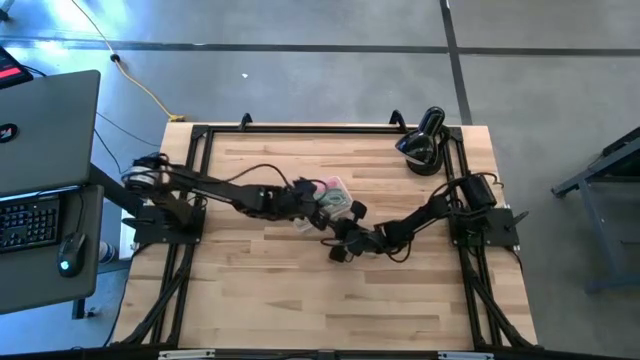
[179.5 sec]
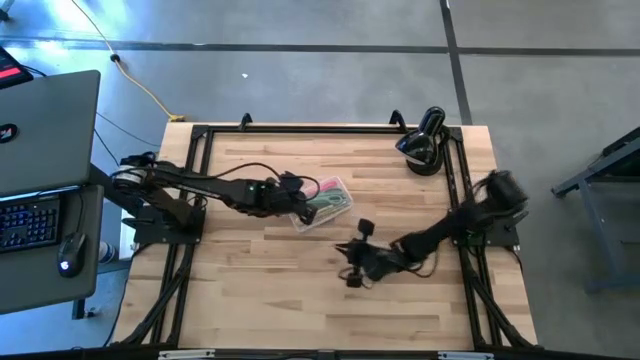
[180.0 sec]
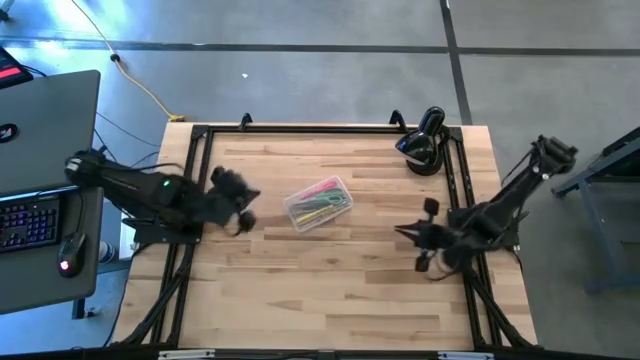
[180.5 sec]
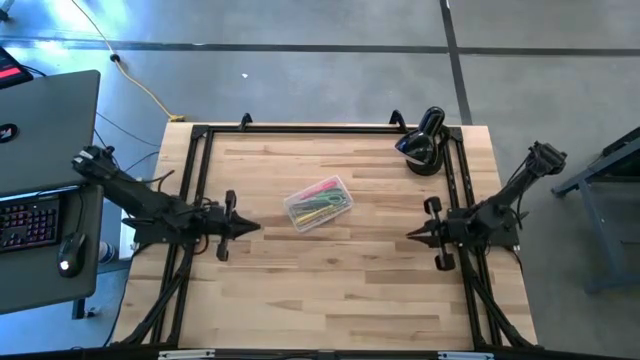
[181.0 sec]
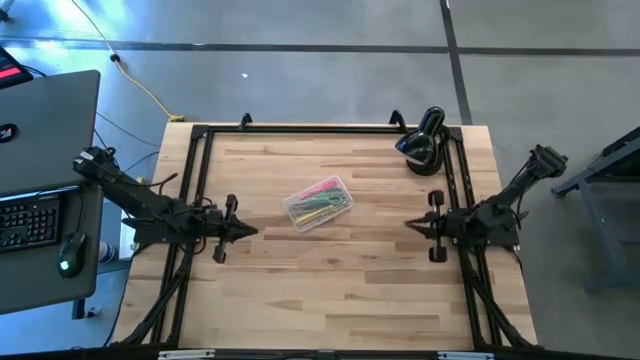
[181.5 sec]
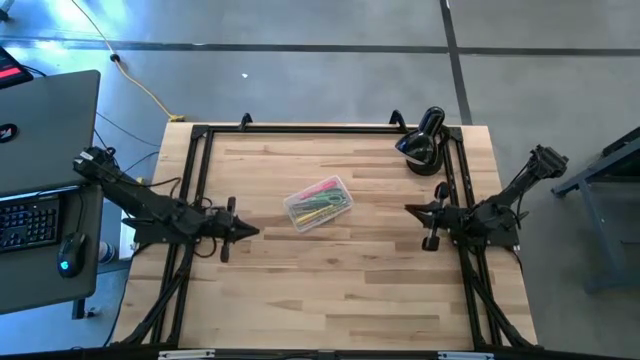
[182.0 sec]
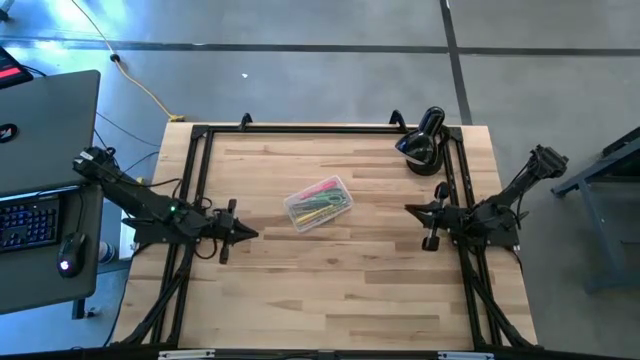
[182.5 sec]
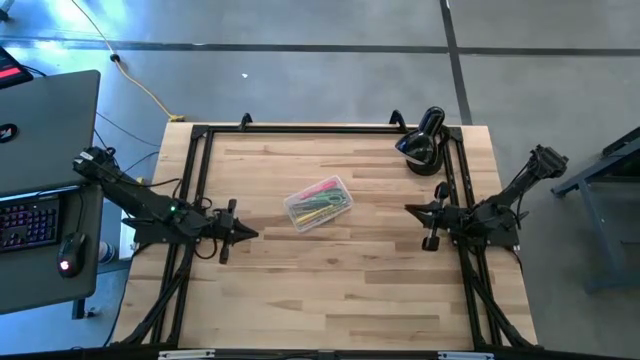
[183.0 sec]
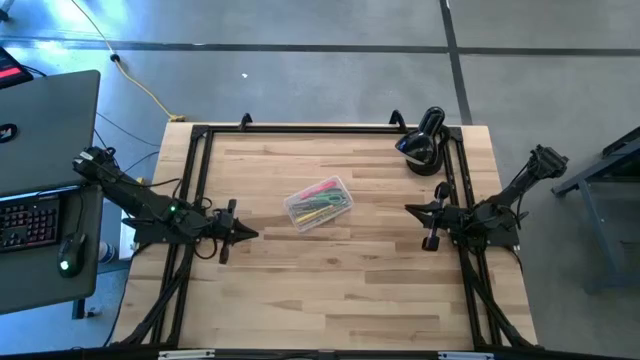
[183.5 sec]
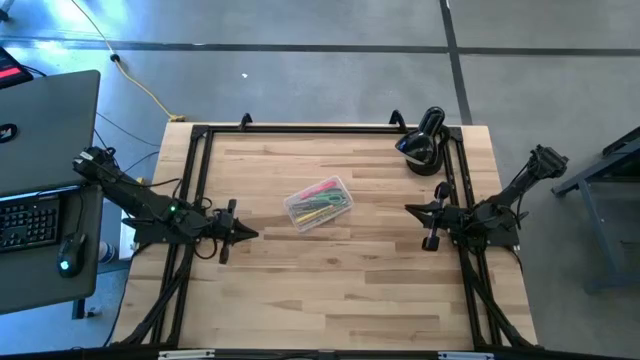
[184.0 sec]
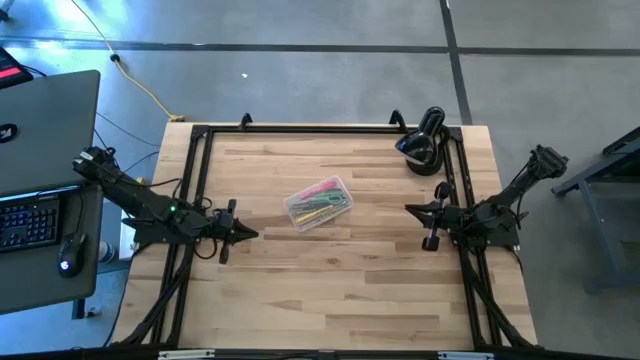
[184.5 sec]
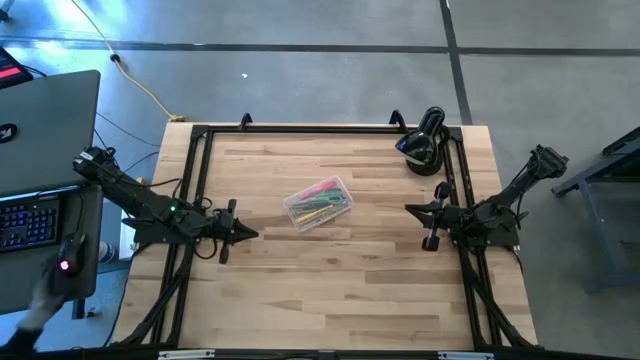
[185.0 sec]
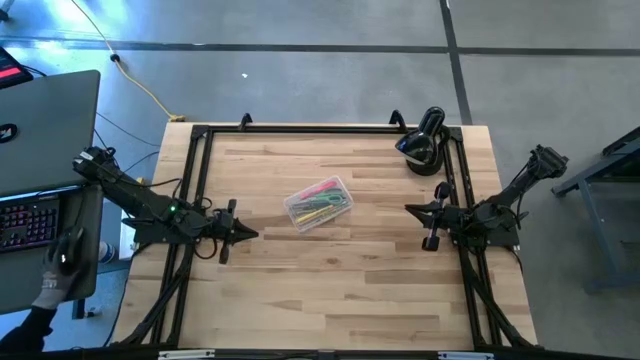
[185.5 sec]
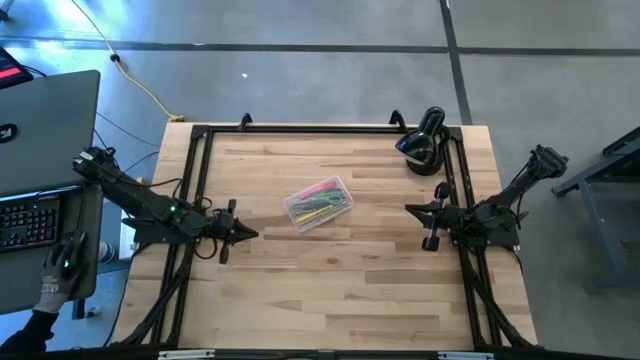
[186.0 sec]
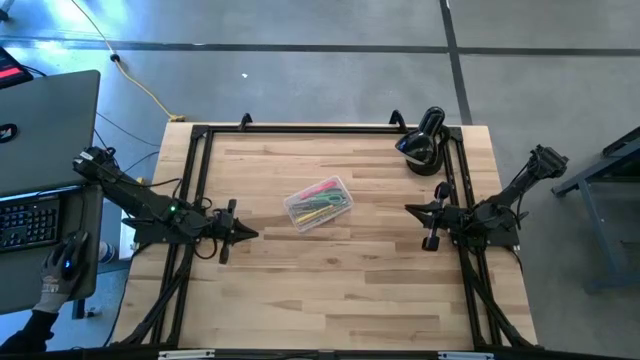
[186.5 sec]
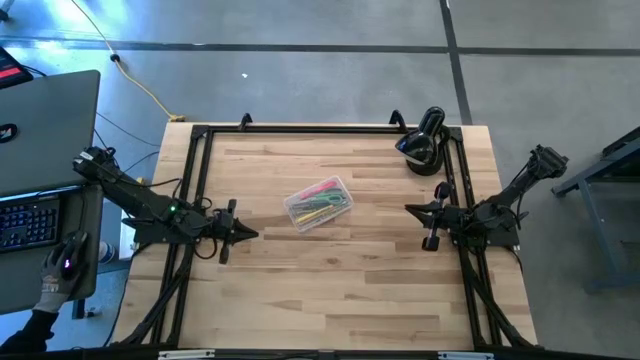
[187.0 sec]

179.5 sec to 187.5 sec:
Task: Pick & place school supplies into a supply box
Return to home position

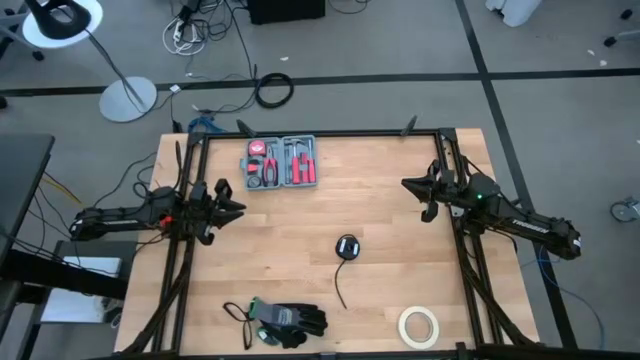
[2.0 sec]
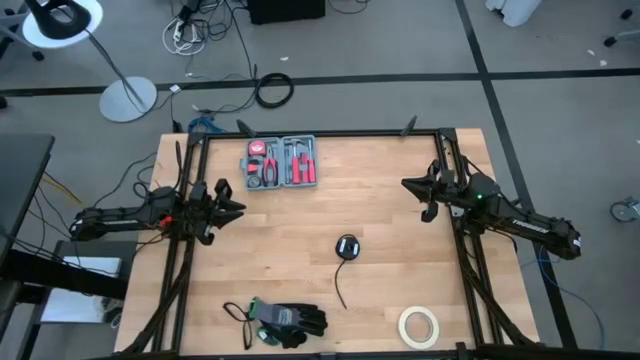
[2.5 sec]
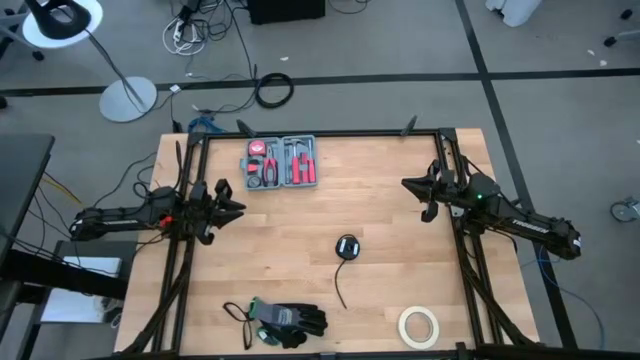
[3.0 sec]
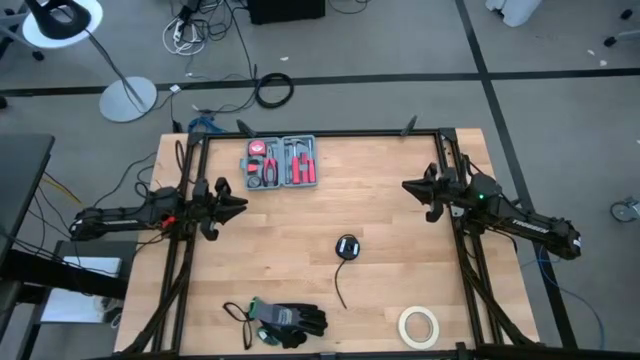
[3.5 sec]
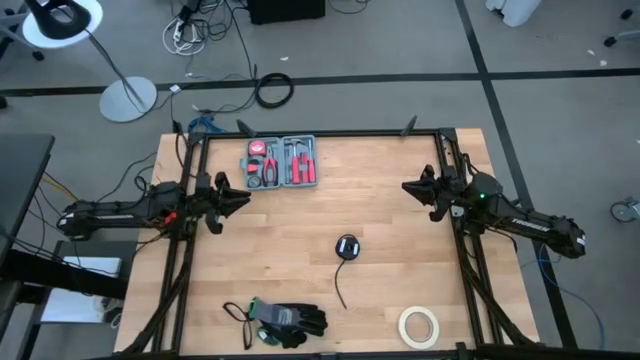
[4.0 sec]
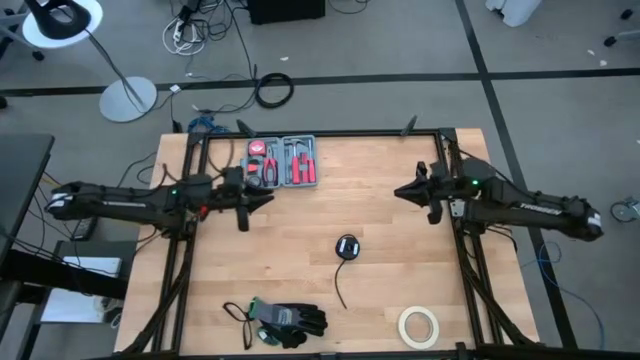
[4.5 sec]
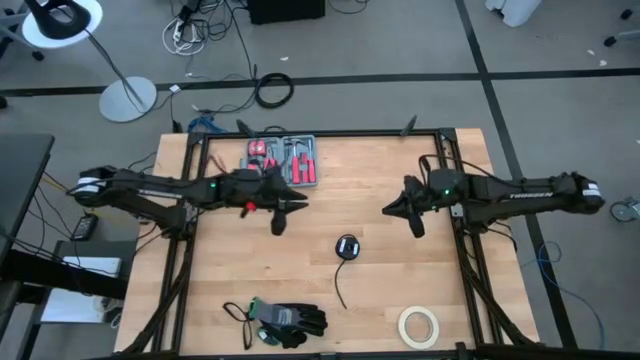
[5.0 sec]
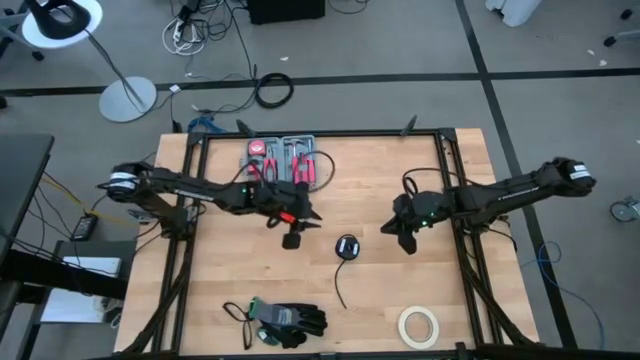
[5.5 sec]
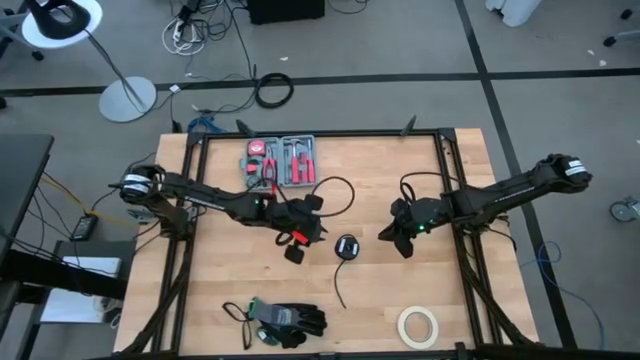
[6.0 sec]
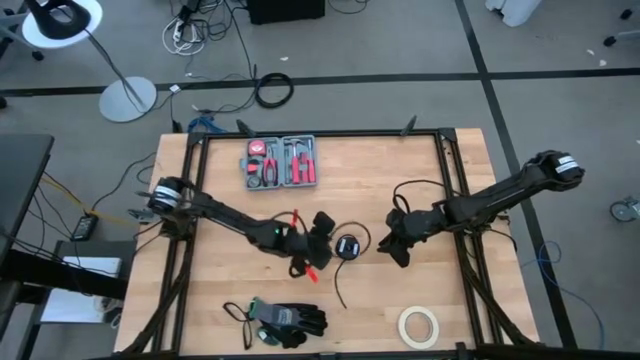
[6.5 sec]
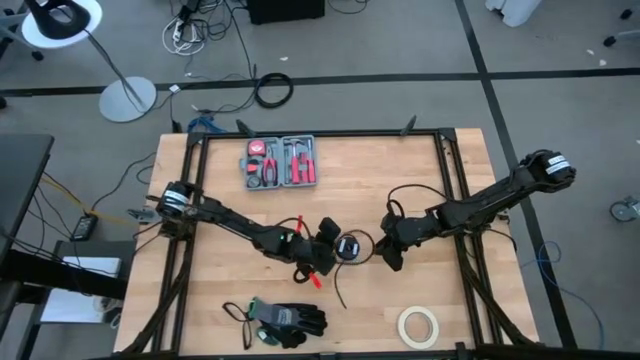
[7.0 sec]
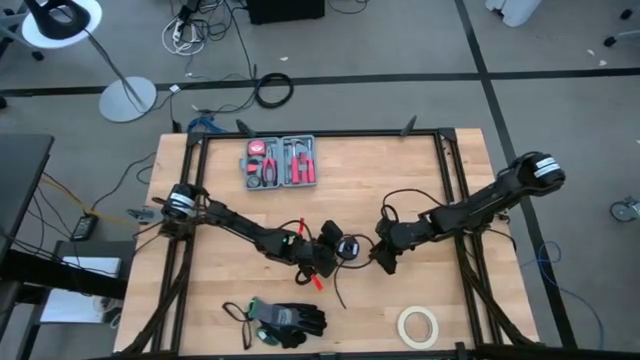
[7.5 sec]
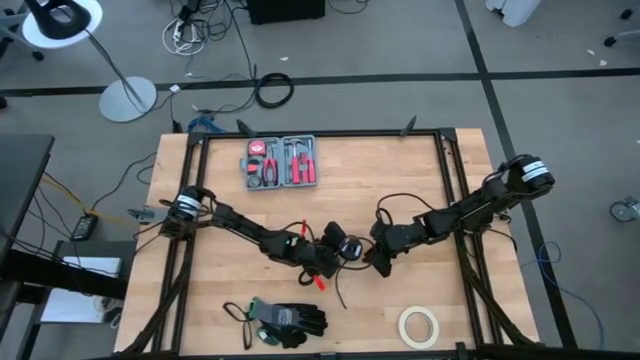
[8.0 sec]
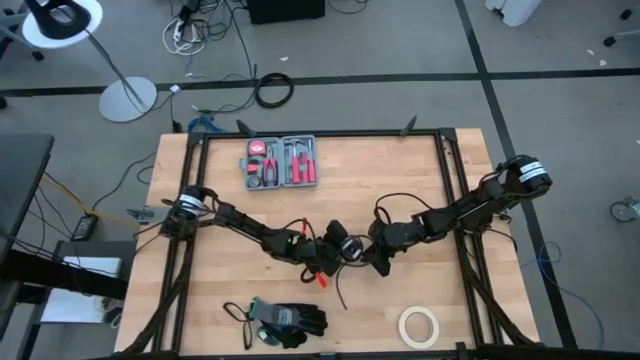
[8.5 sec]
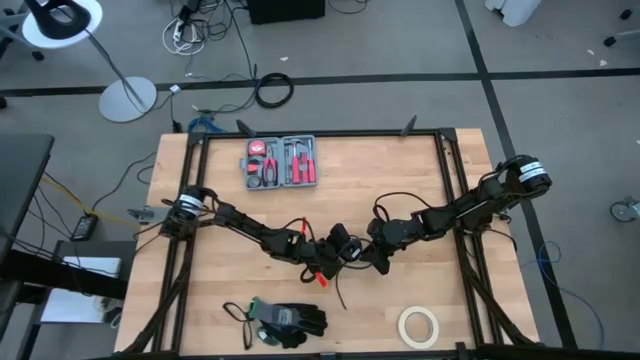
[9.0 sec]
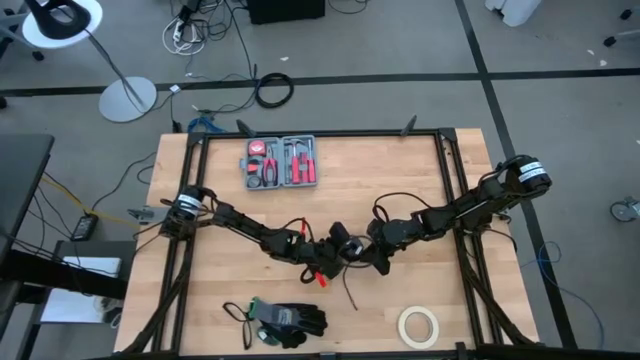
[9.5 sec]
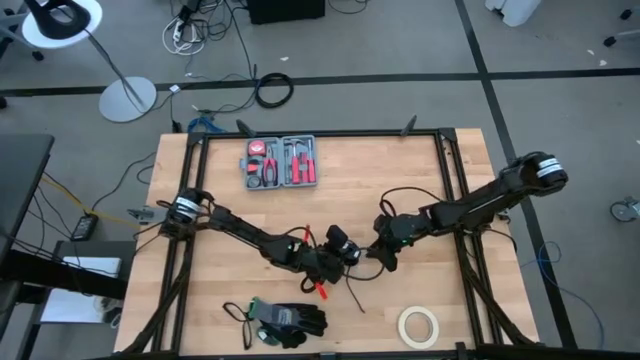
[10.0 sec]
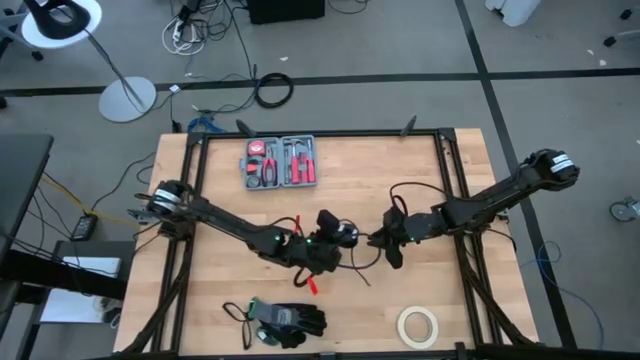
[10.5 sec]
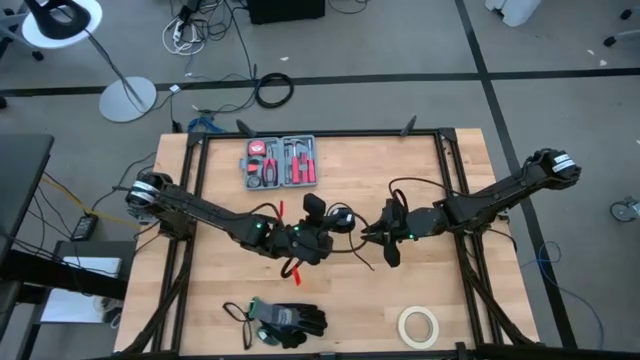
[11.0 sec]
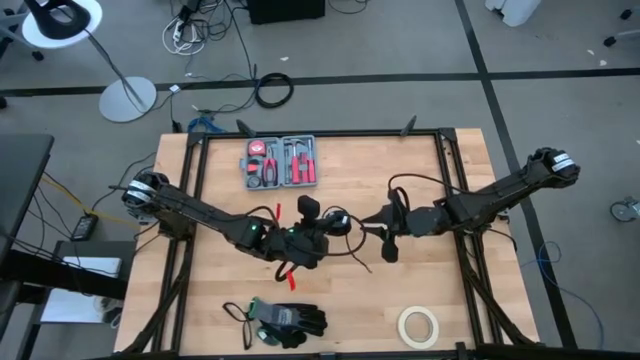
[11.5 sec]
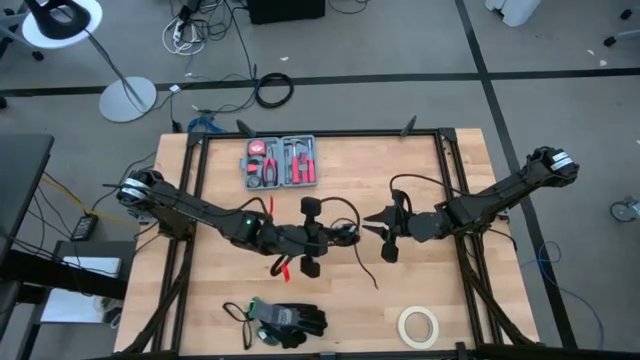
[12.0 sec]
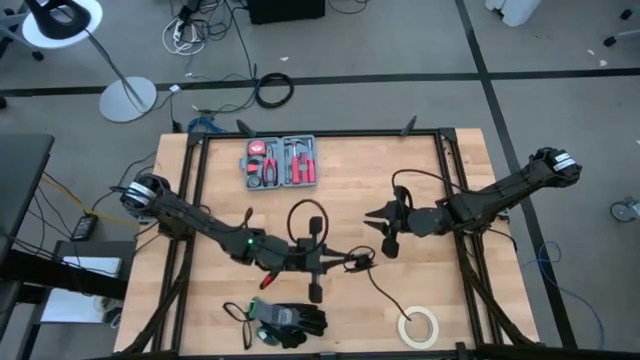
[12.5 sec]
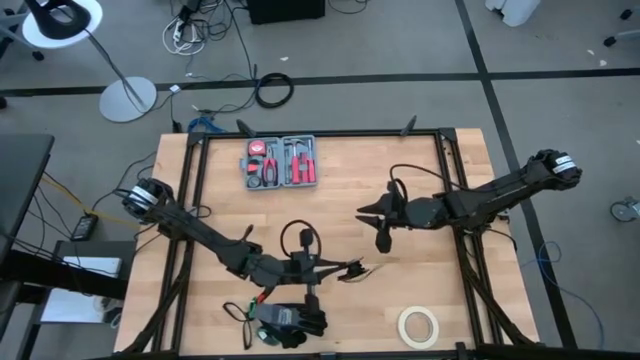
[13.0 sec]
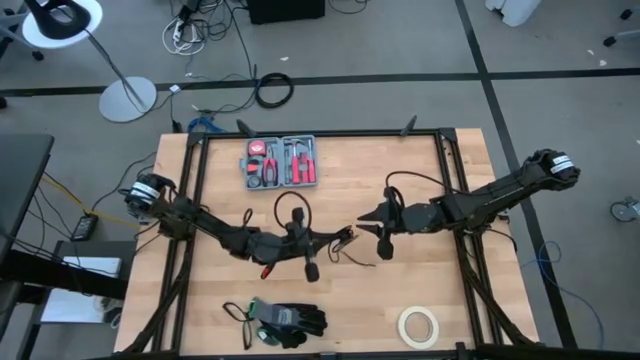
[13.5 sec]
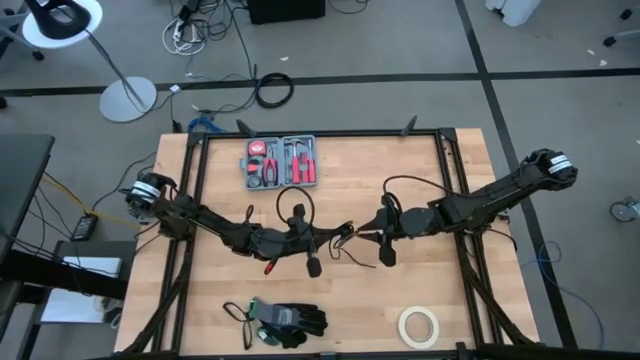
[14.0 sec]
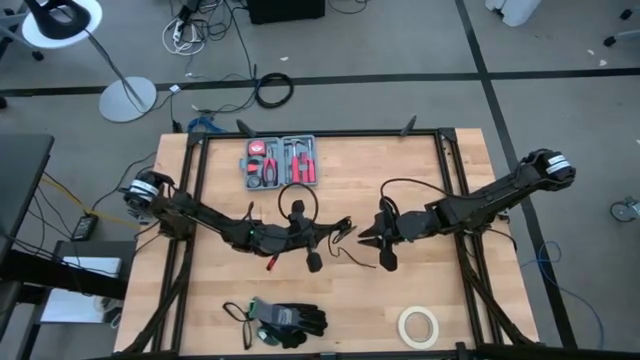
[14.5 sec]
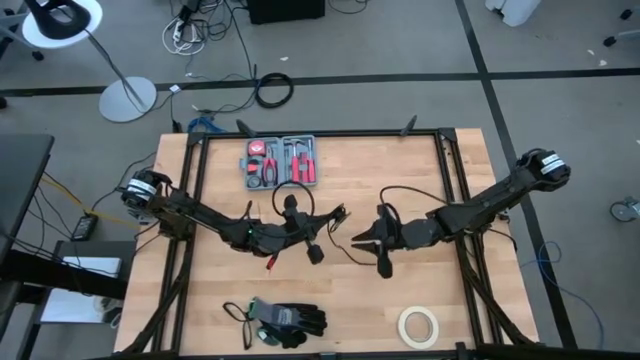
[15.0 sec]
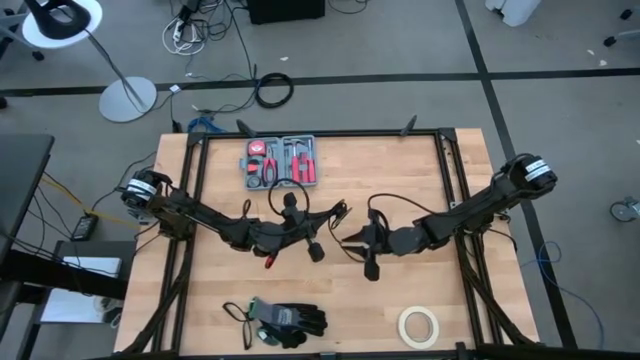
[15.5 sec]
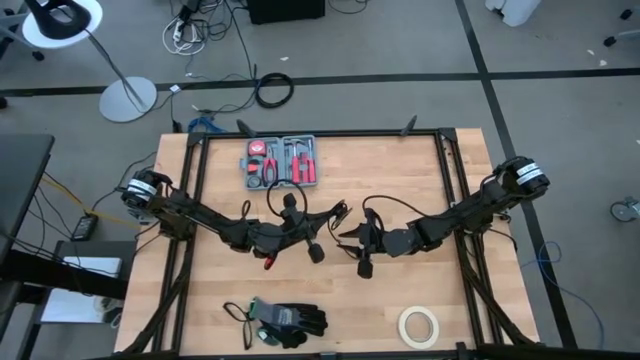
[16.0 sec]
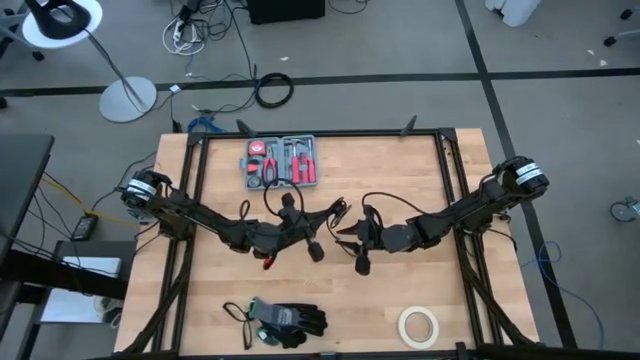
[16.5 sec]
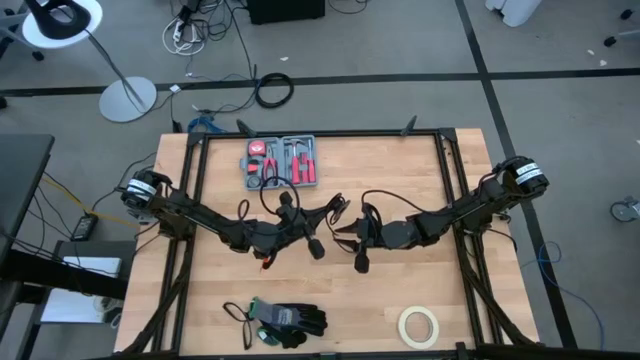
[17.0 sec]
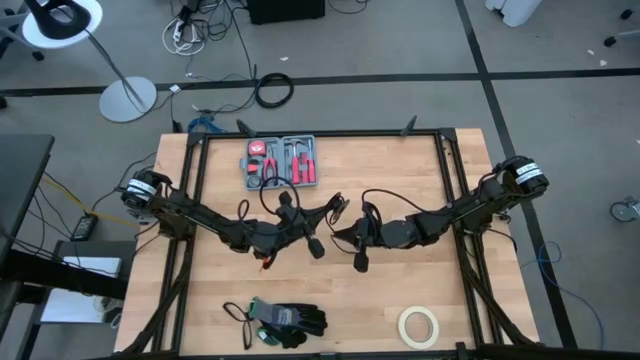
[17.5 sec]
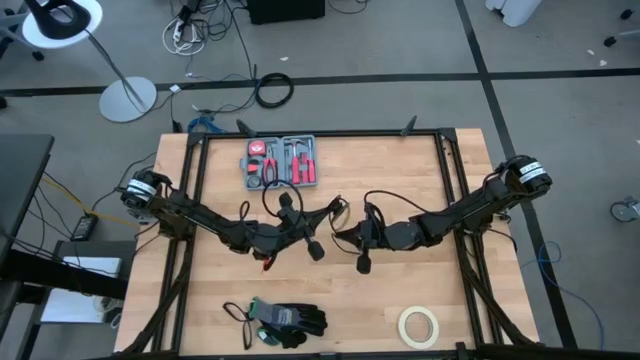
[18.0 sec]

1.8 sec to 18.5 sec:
Task: Coil cords
Uncoil the black wire cable from the black spool
